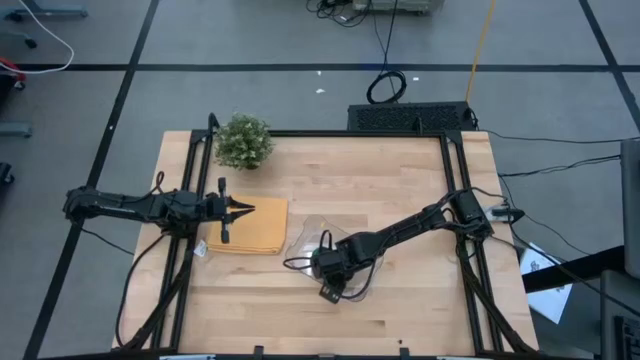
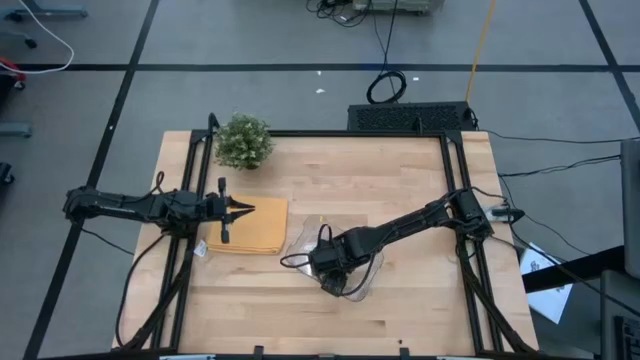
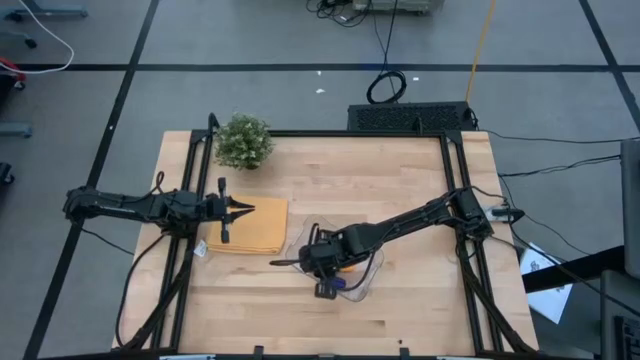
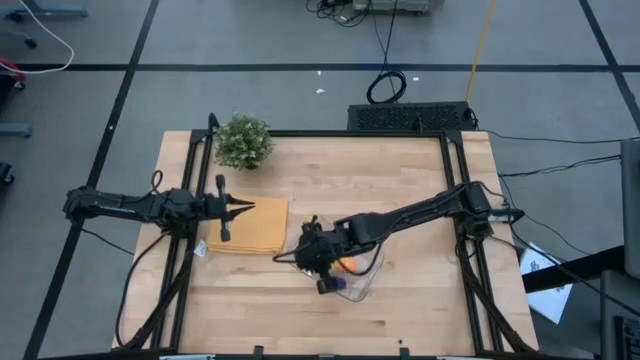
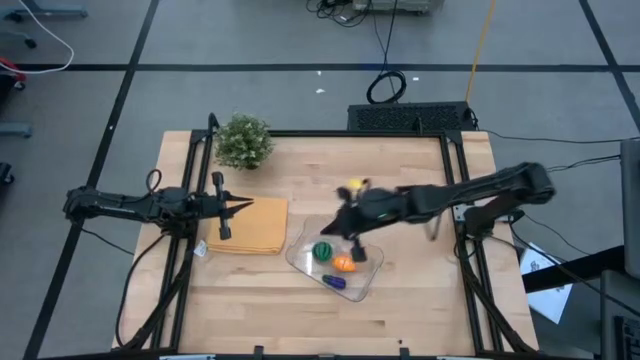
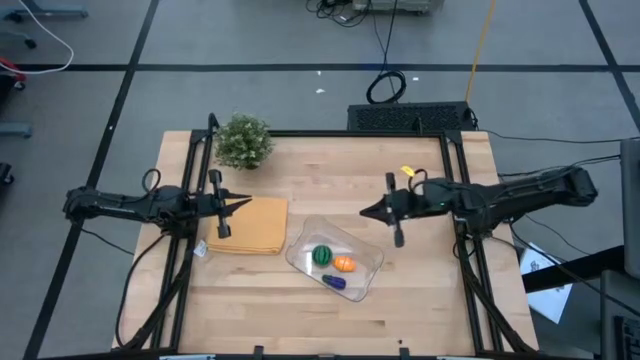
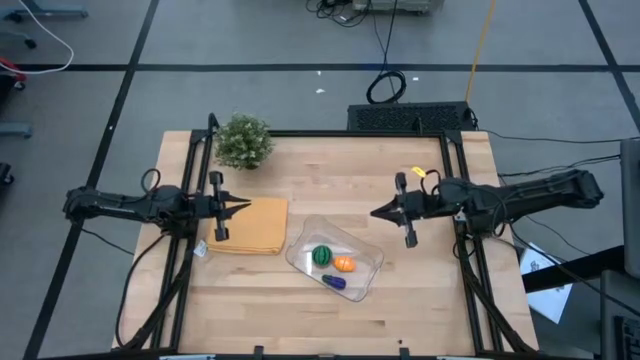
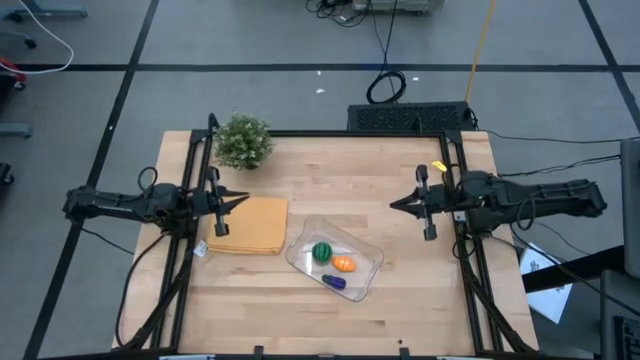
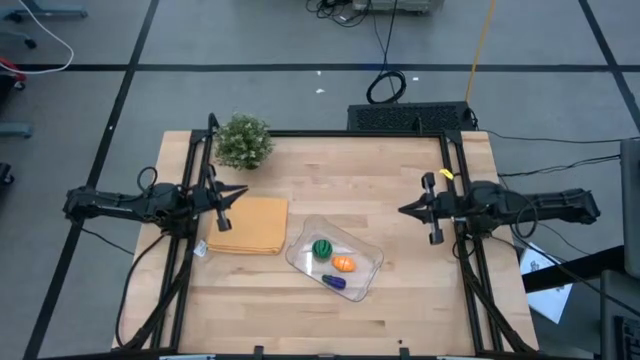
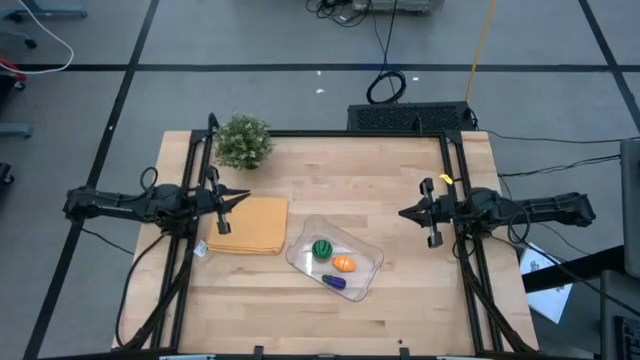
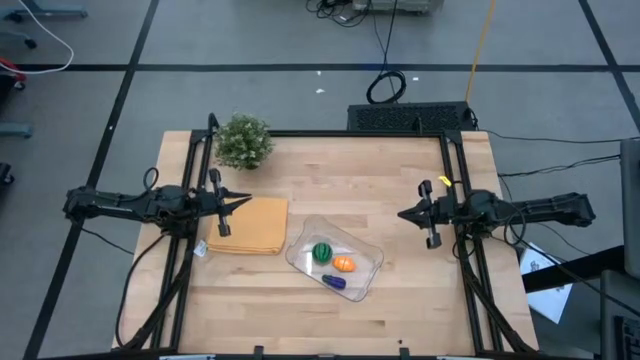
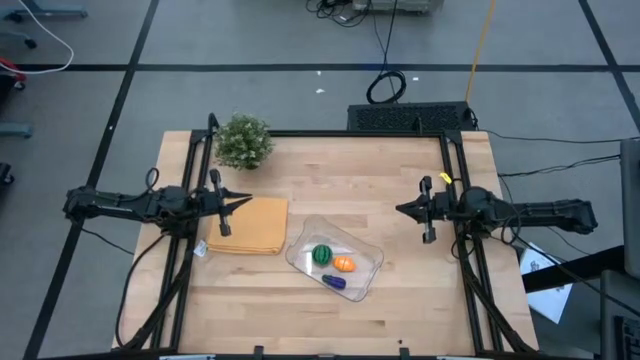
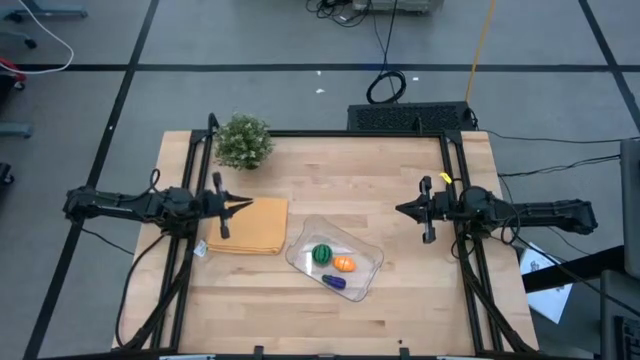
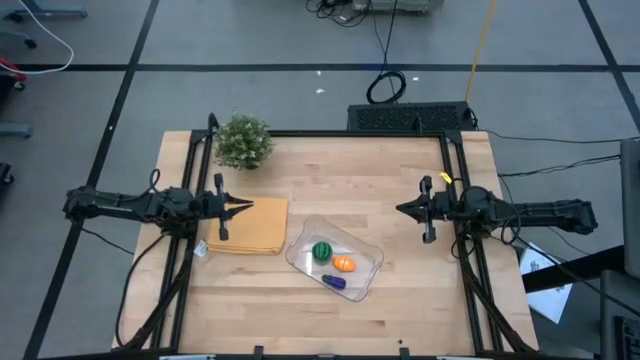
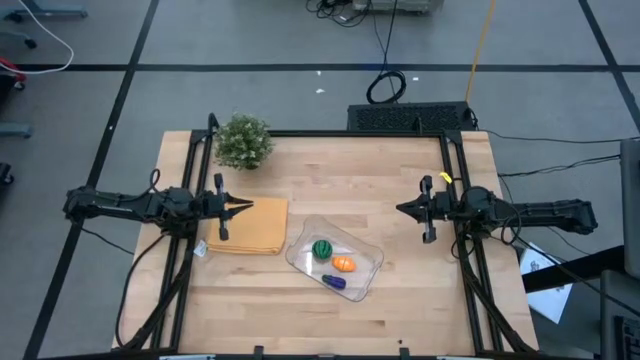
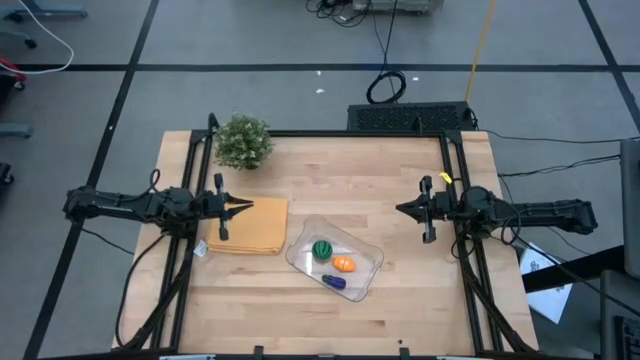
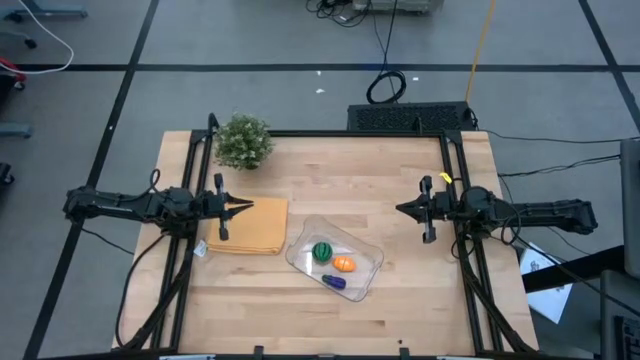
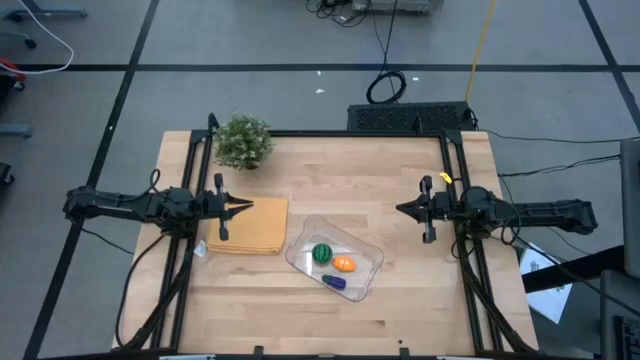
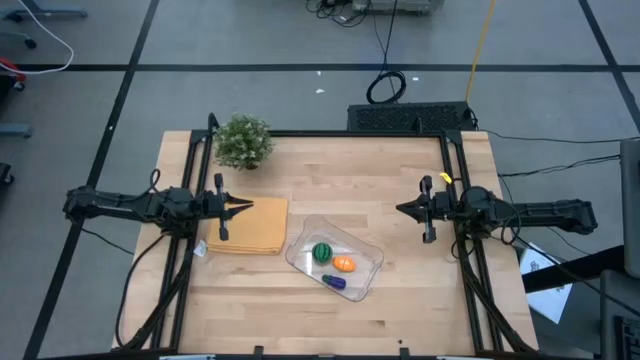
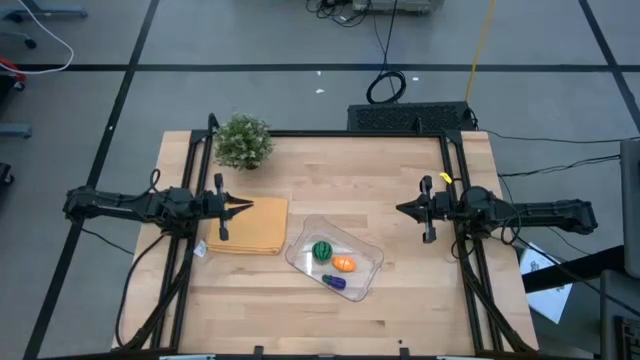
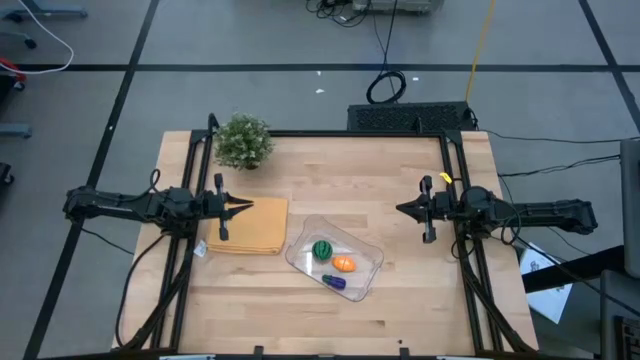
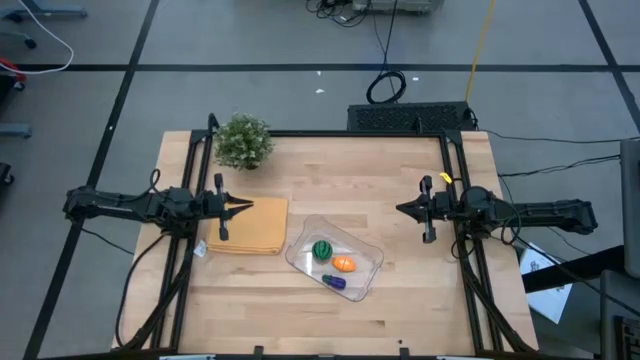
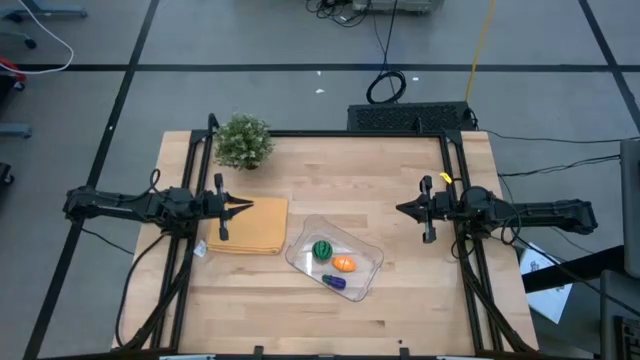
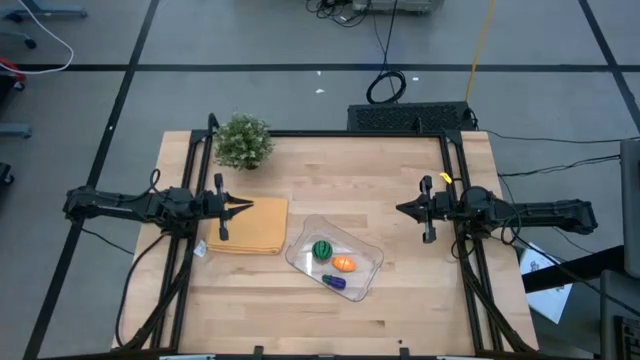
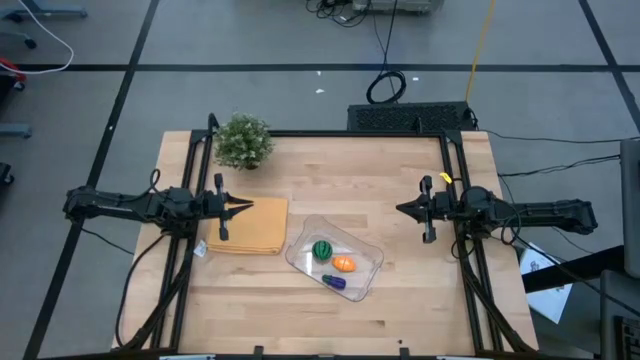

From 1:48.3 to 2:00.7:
Task: Pick and placing Produce into tupperware
Return to Home Position

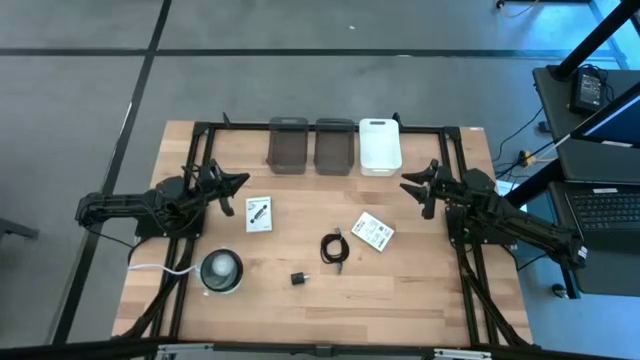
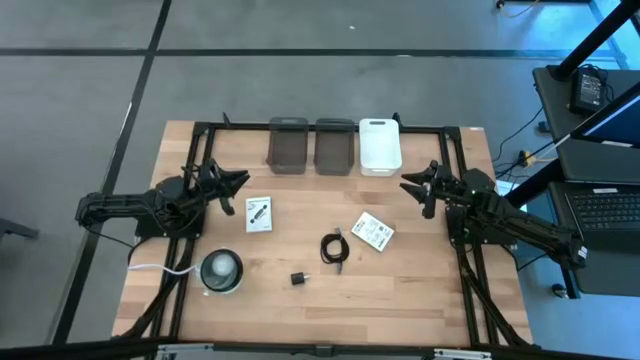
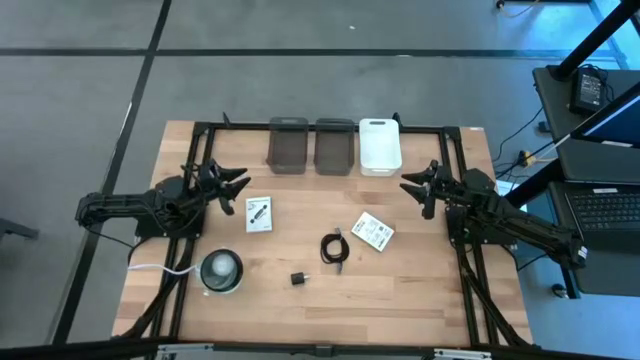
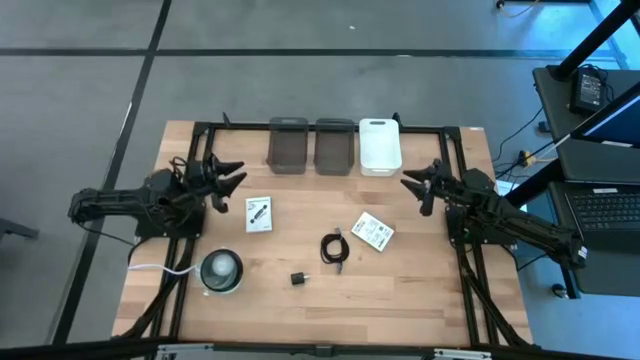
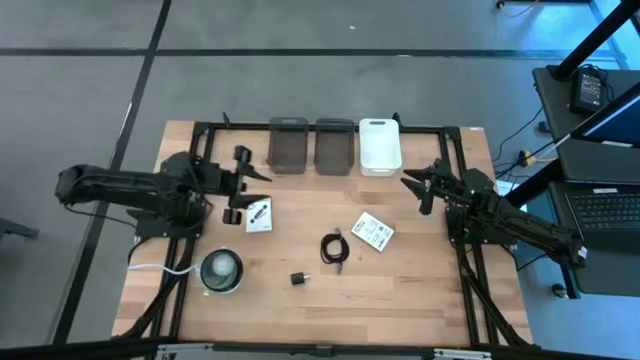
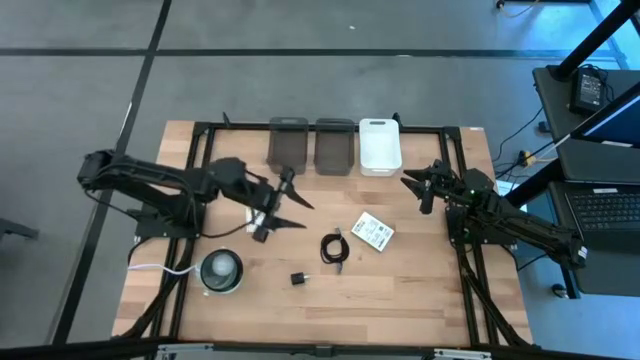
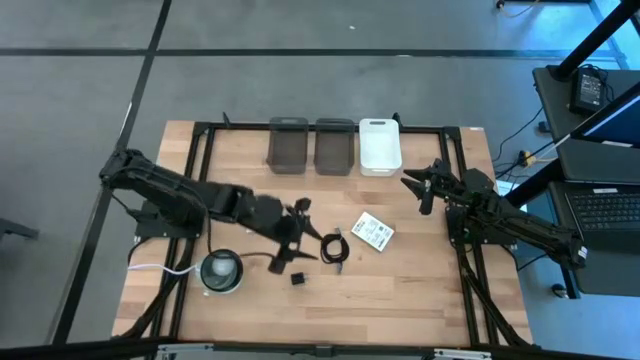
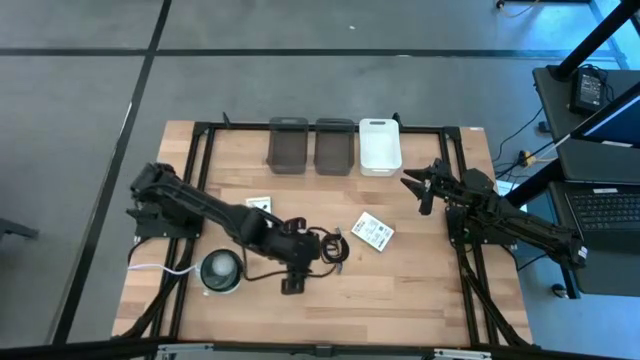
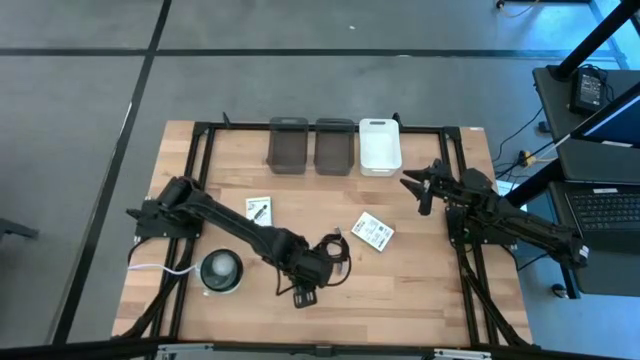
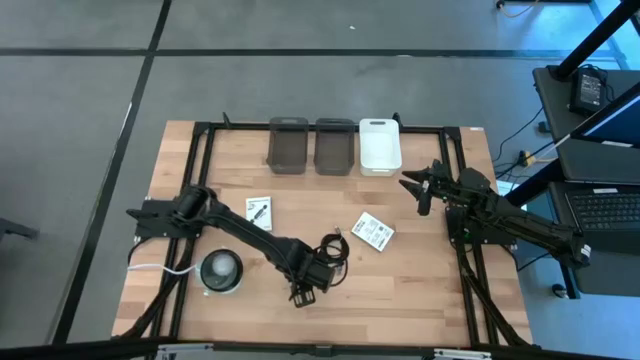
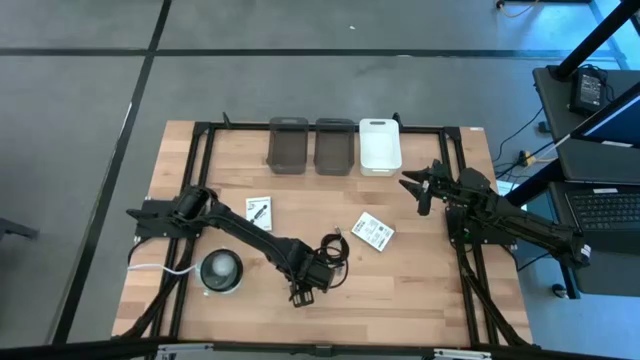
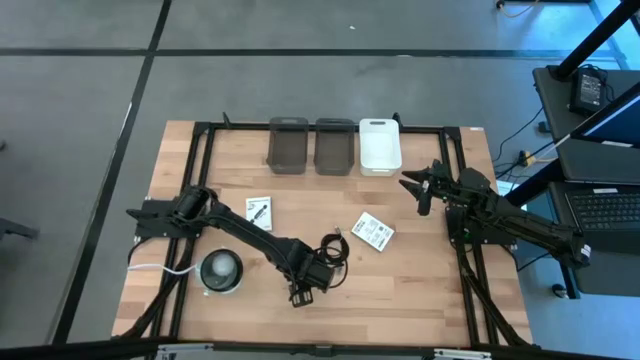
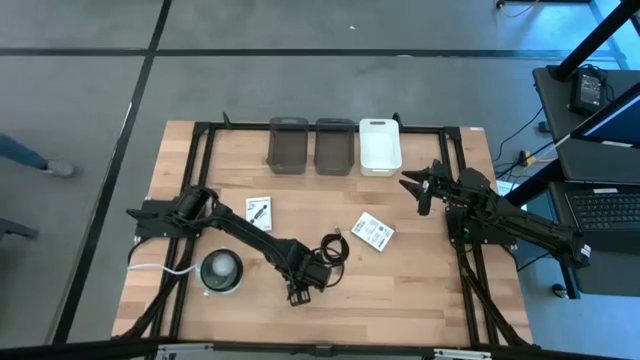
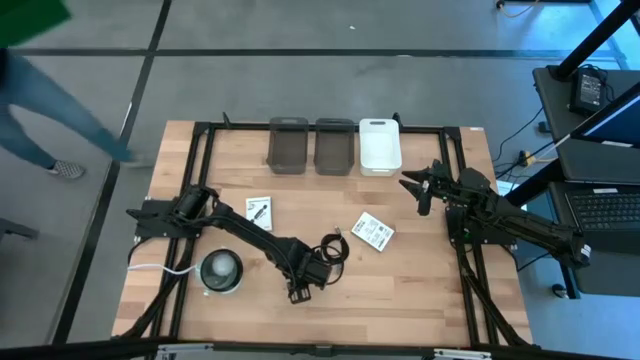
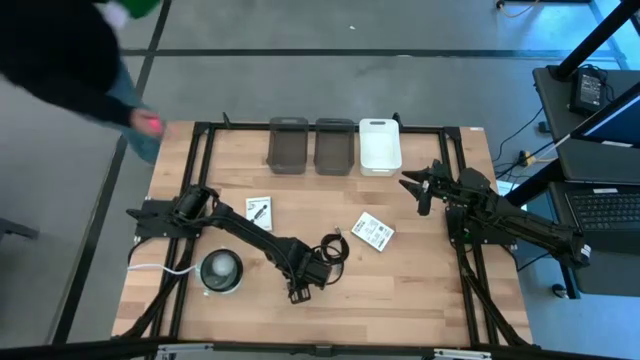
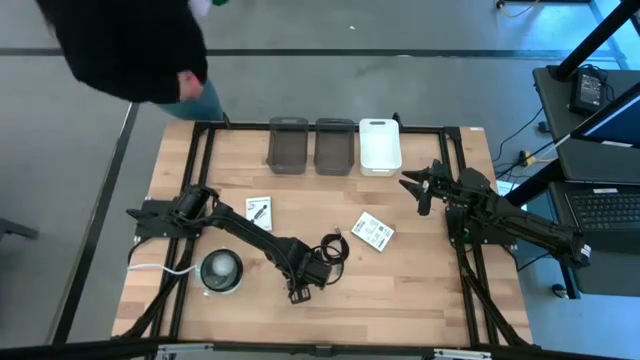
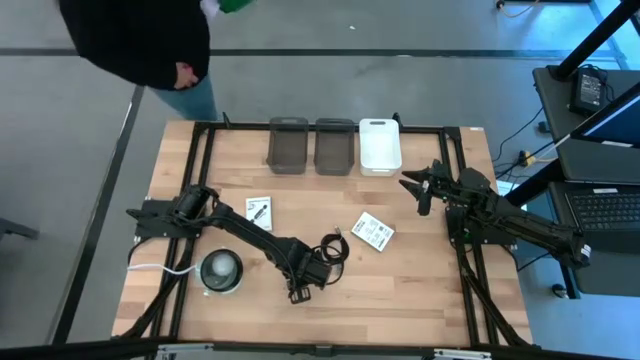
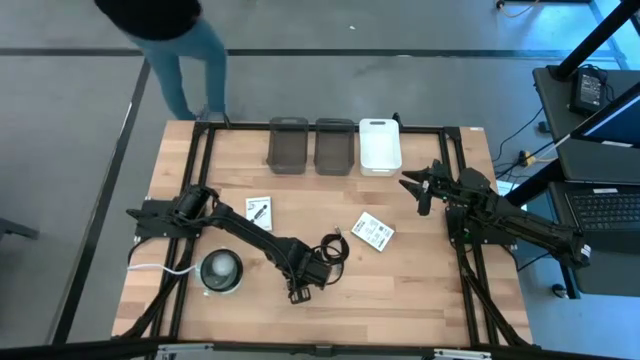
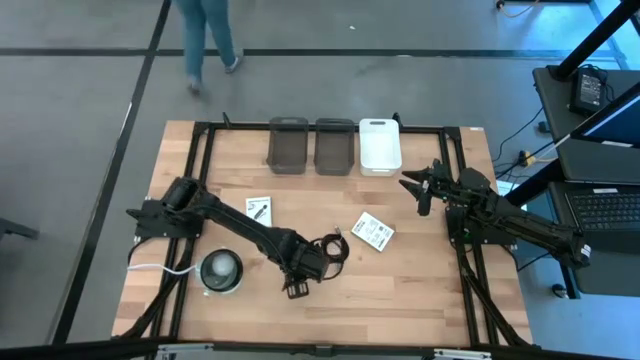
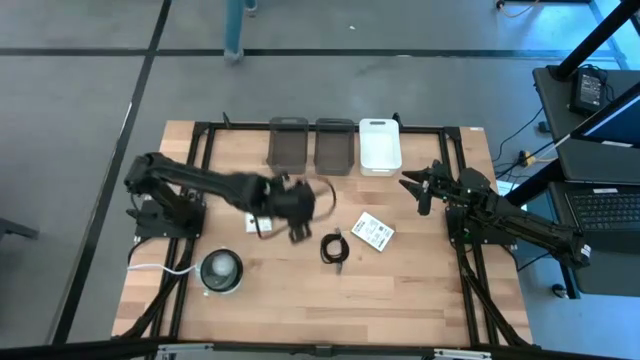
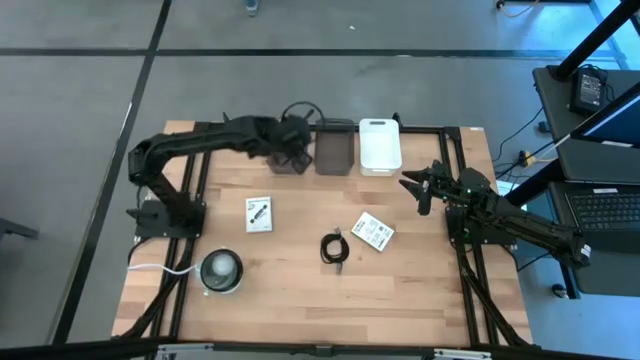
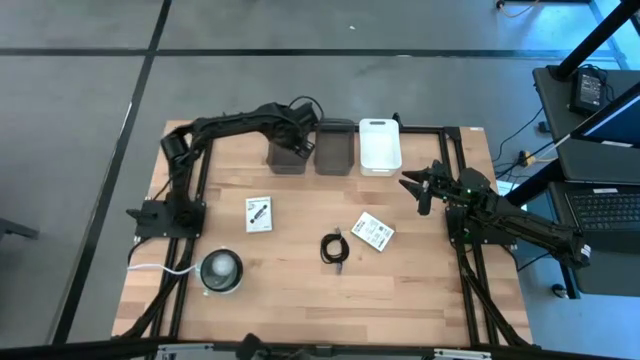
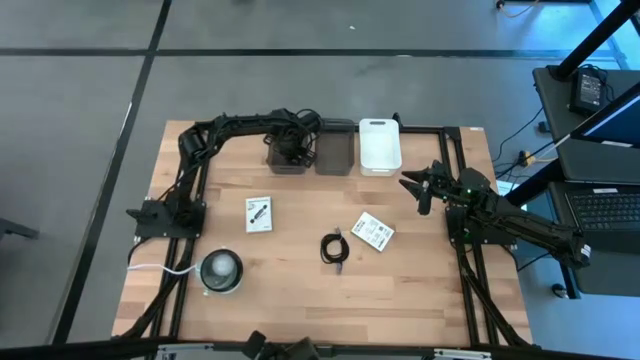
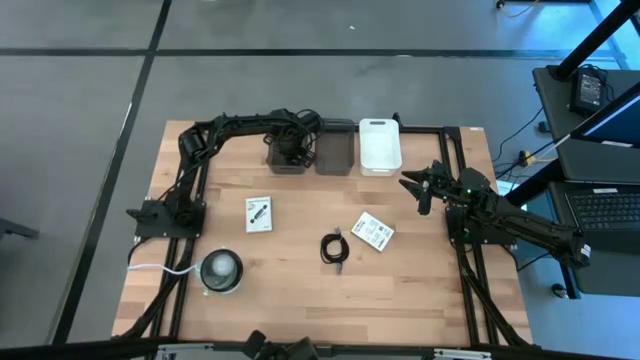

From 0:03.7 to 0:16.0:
Task: Pick and place items into bin
Put the black charger adapter into the left gray bin
